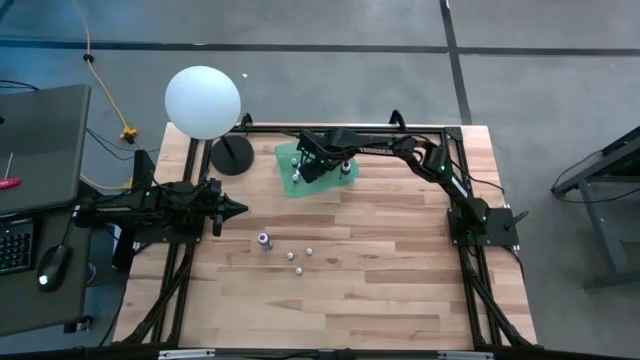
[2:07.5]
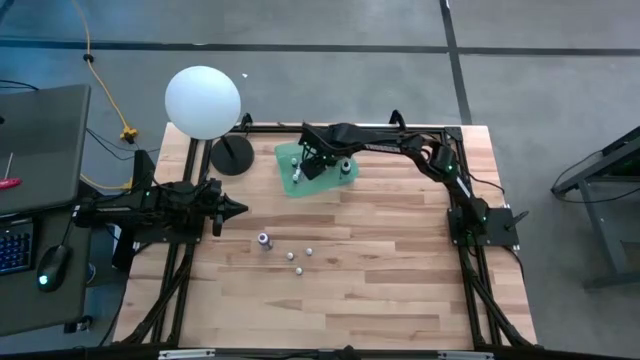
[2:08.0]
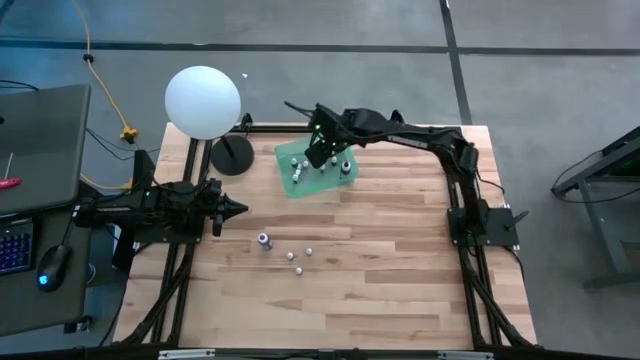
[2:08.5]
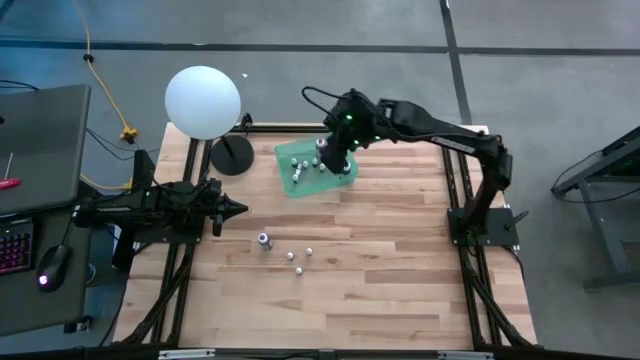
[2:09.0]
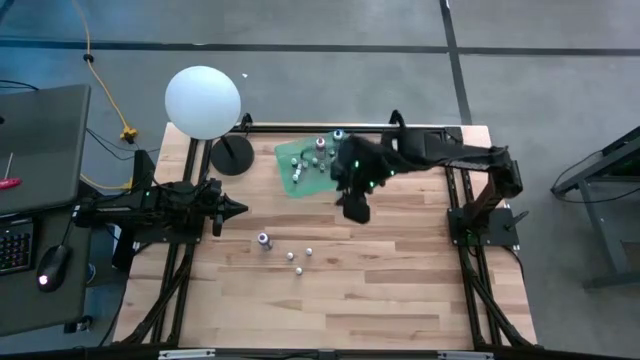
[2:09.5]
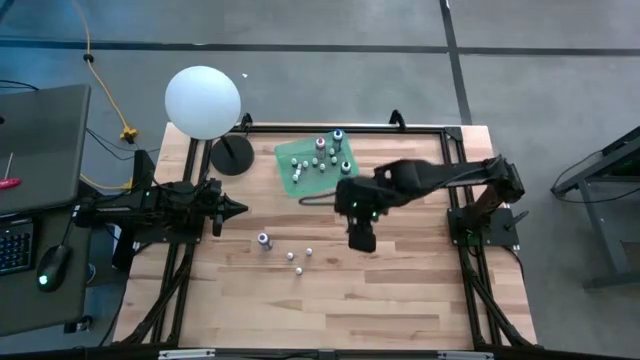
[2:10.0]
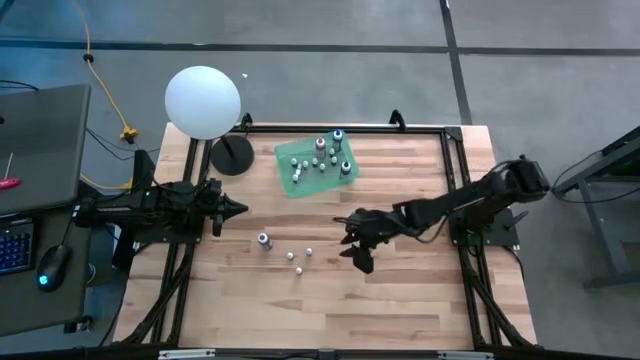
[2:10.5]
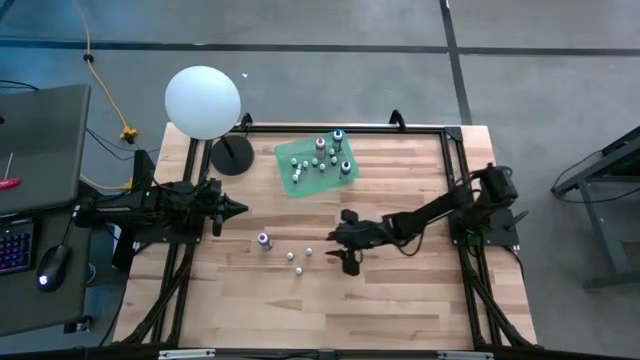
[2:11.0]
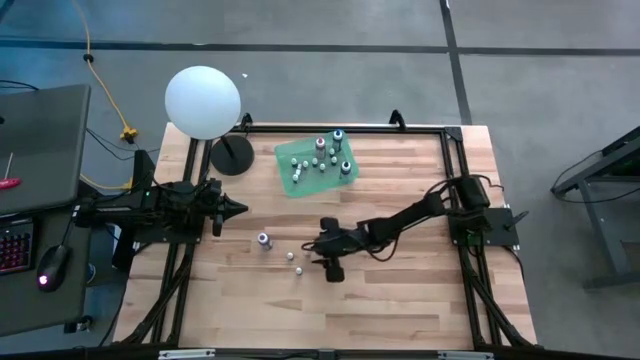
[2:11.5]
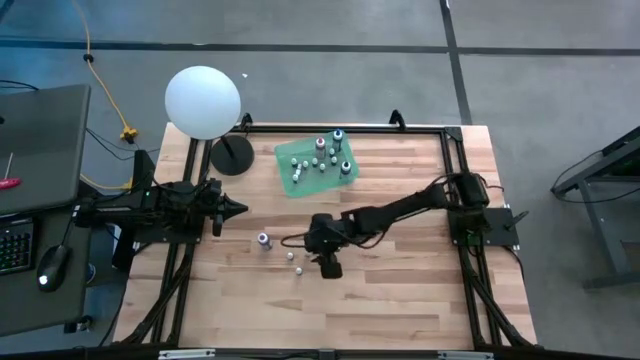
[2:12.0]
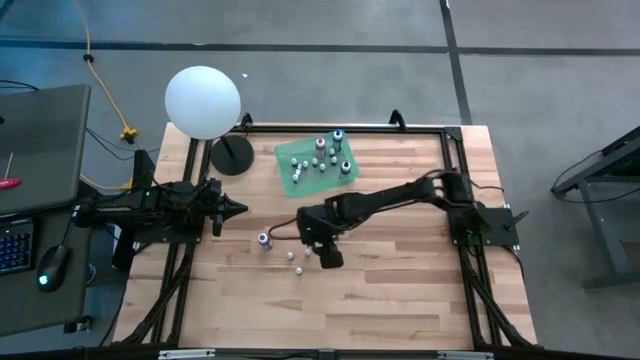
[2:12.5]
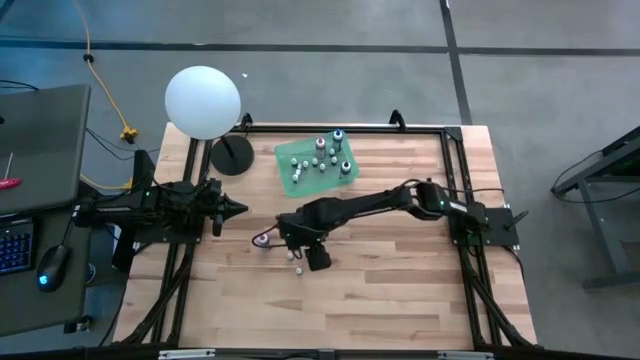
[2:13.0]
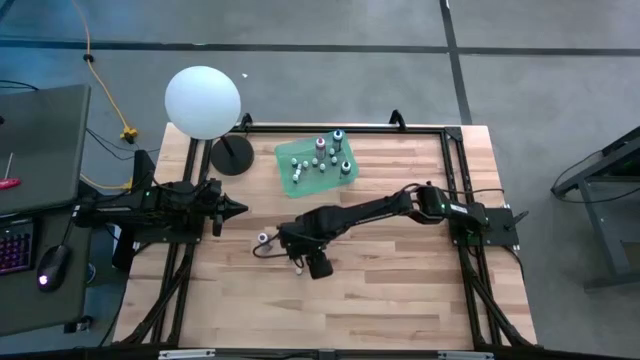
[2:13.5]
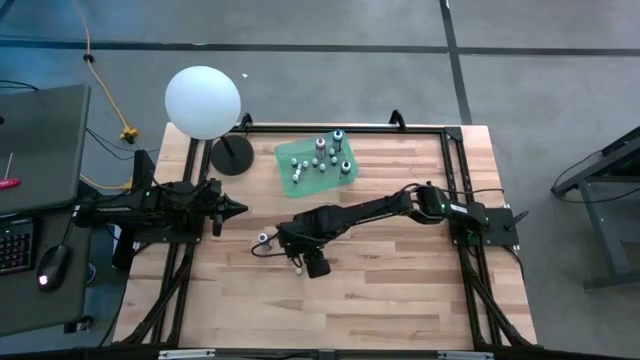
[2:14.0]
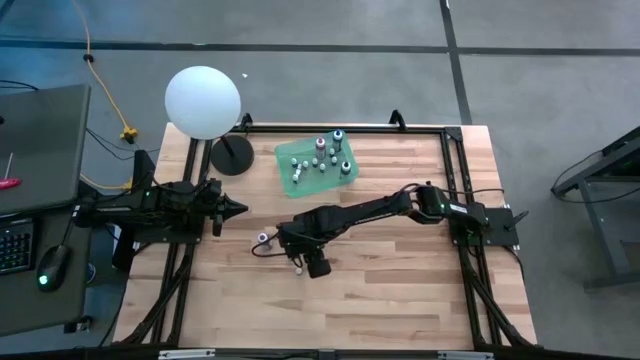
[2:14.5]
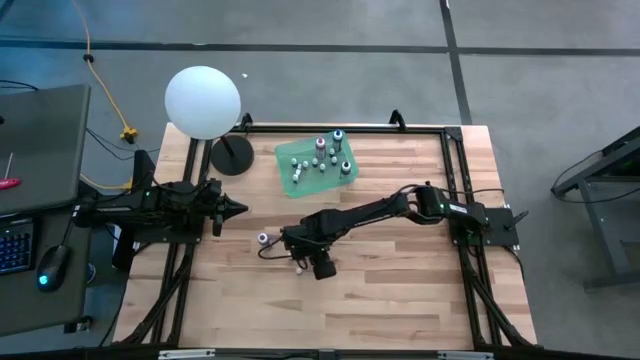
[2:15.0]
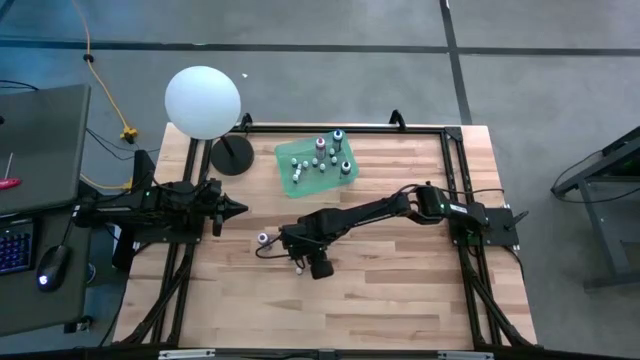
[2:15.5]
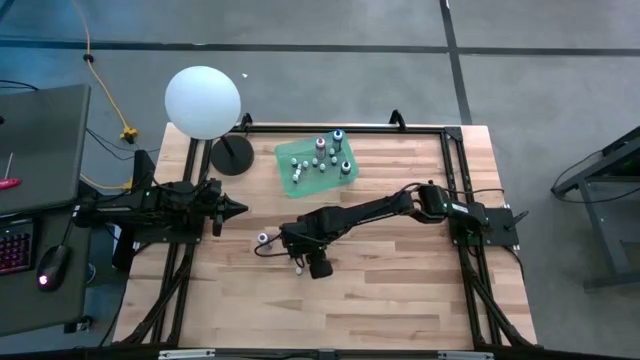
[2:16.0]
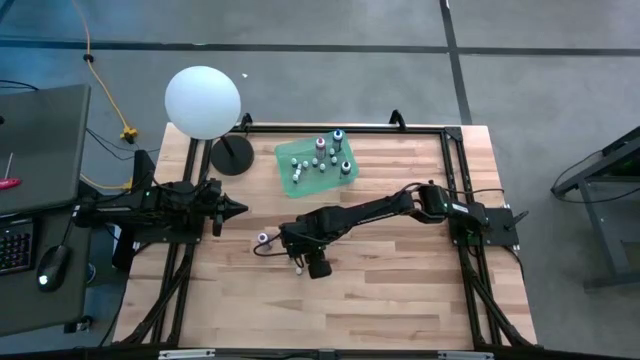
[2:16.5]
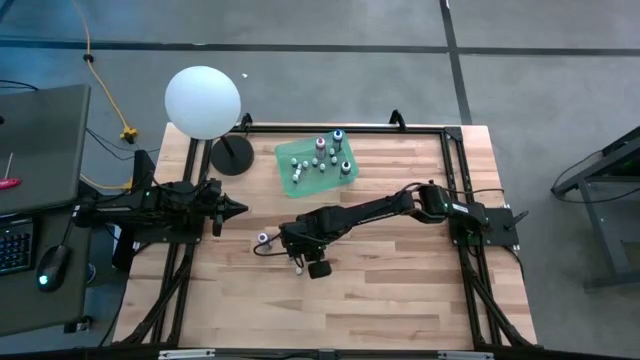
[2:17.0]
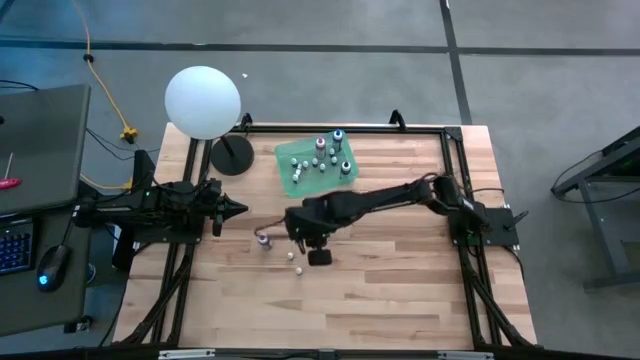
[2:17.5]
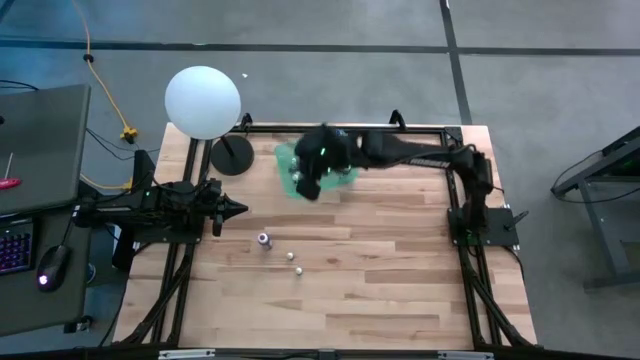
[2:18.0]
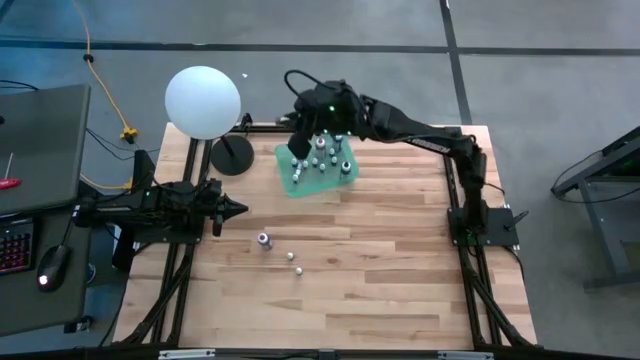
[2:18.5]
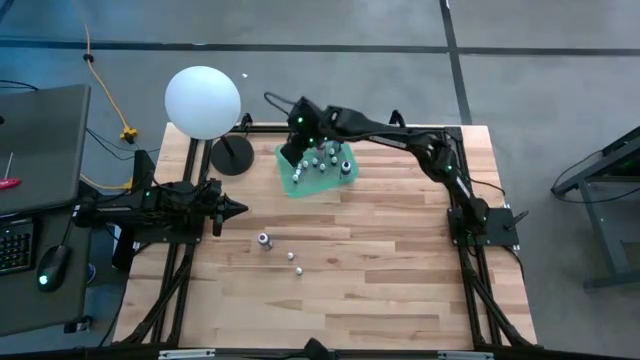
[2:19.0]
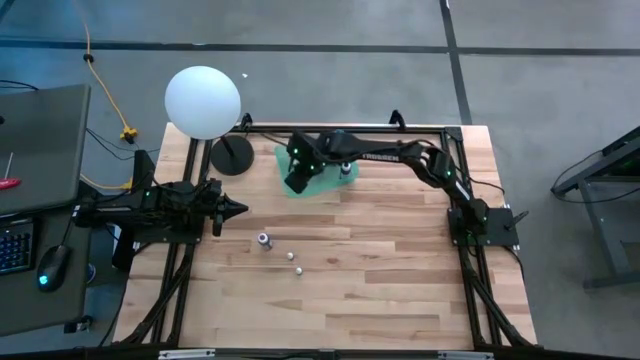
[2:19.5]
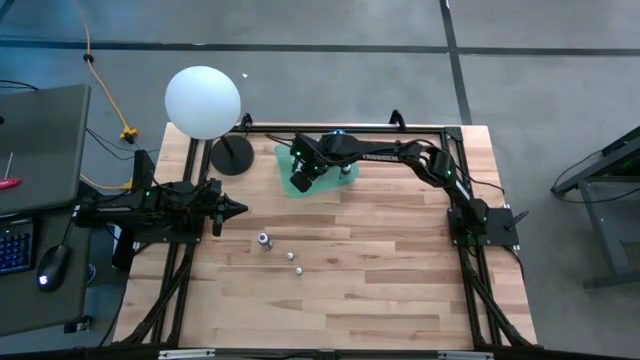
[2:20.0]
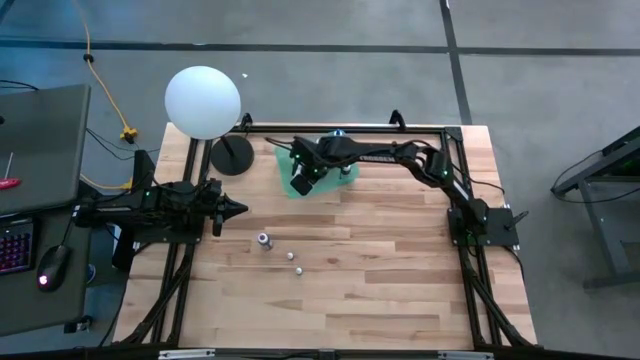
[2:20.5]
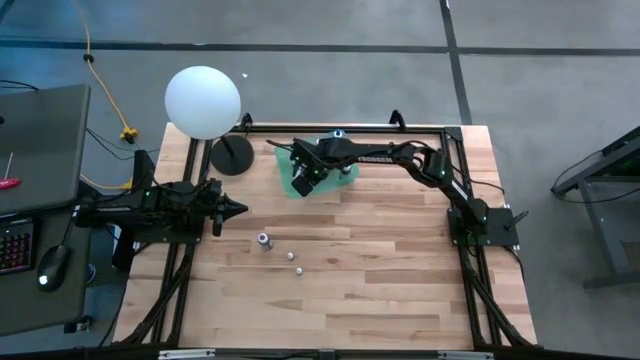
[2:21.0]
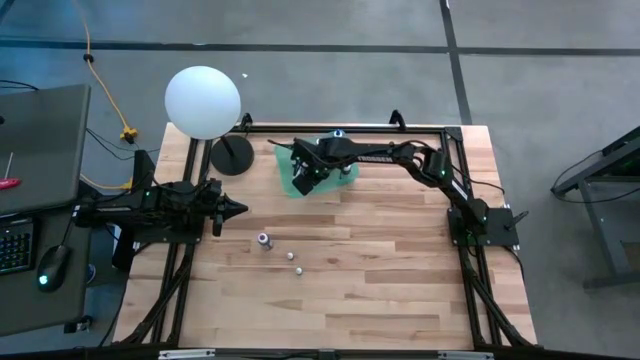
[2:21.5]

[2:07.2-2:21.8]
Task: Pick & Place food coloring
Put the small black dye bottle in the green bin

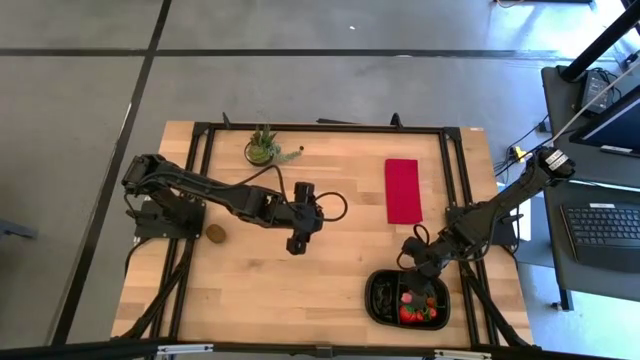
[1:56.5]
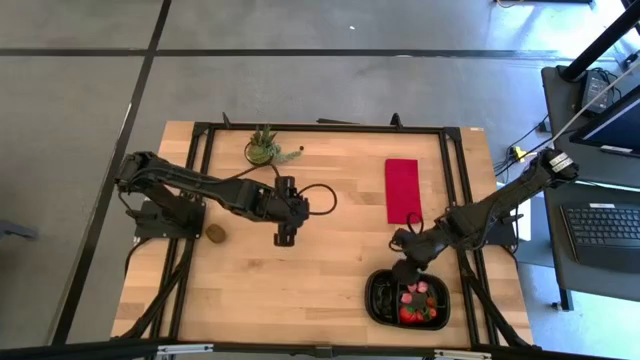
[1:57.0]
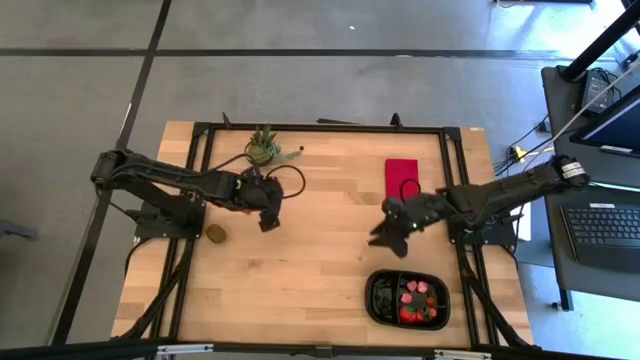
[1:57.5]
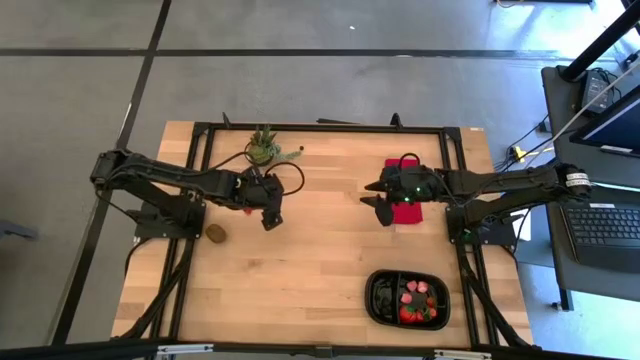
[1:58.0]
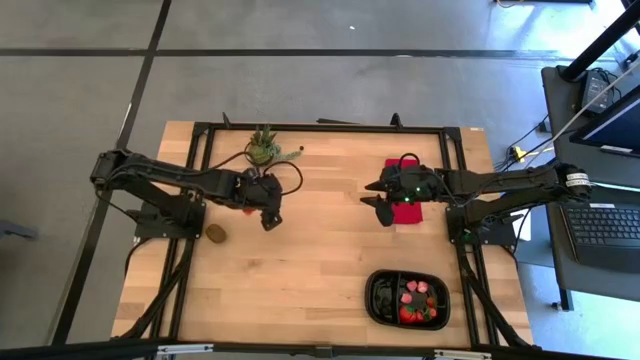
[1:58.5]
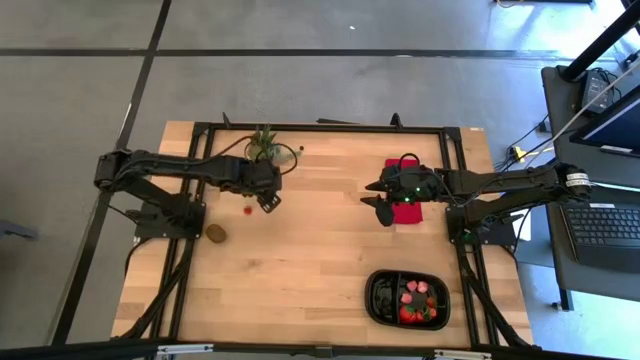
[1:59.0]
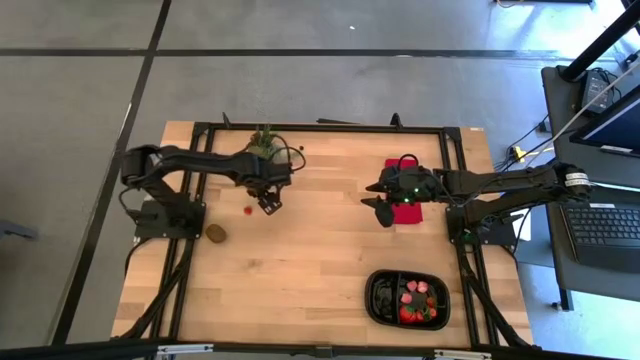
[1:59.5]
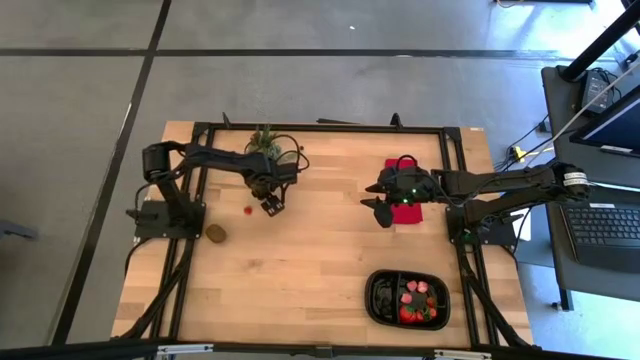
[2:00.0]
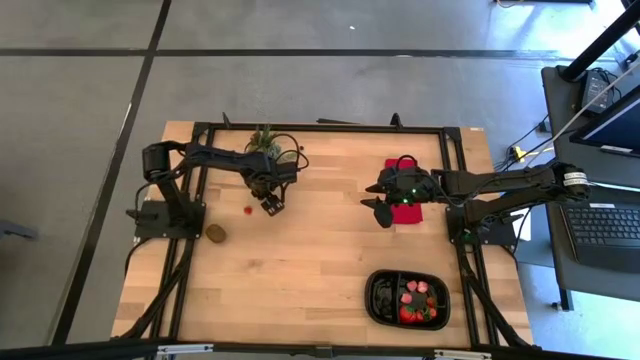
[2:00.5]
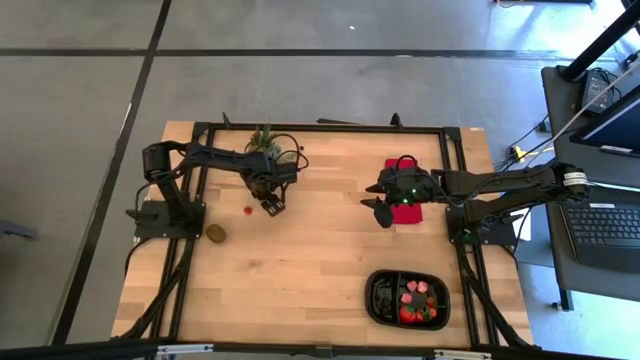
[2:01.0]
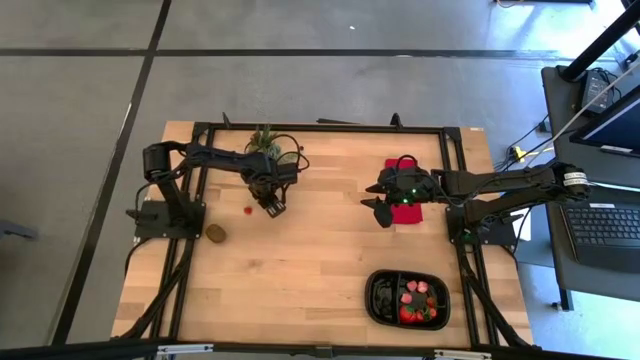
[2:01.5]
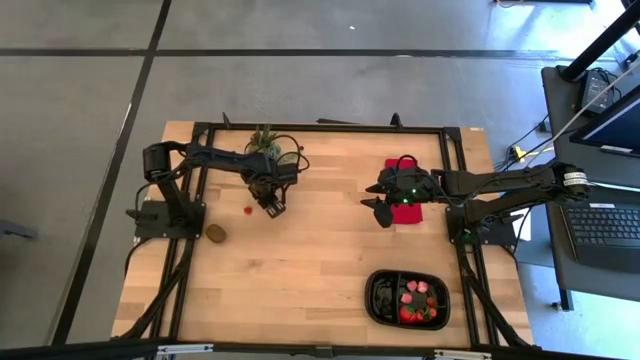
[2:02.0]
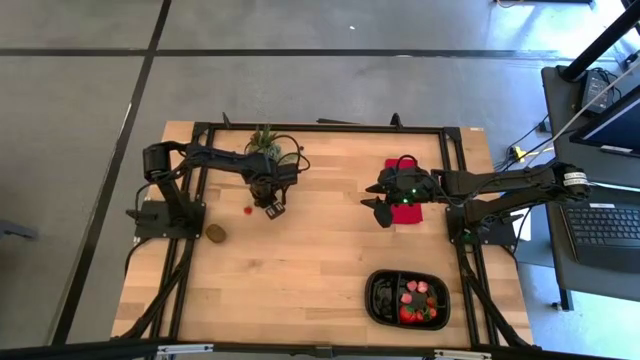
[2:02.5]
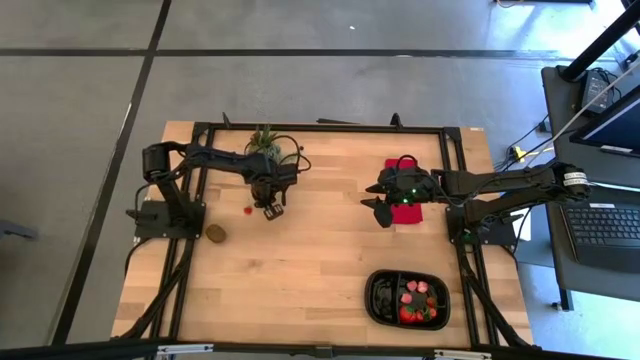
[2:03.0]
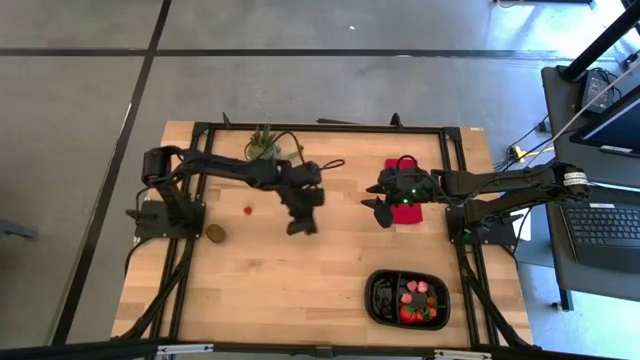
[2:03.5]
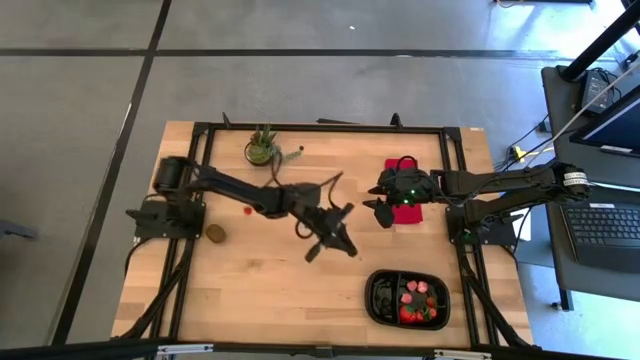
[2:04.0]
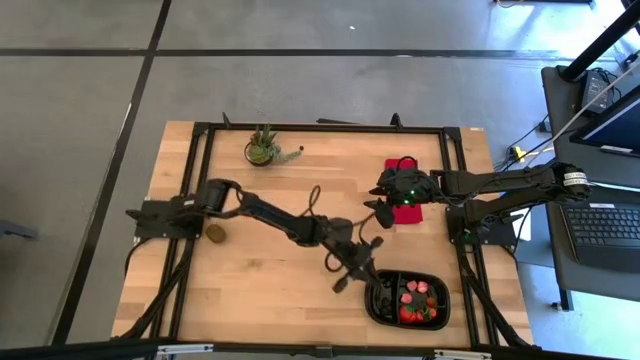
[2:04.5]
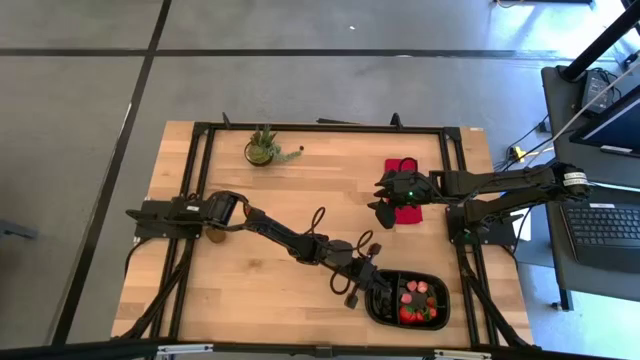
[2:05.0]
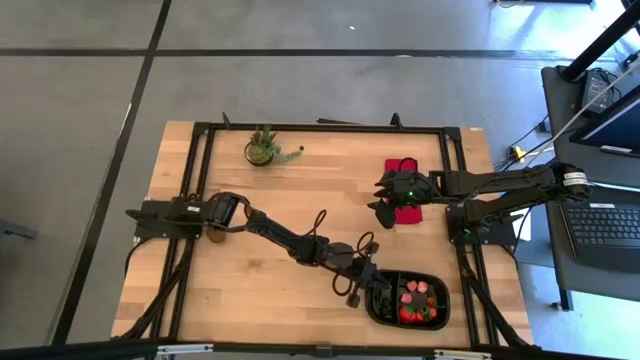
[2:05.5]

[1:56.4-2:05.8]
Task: Pick and placing Produce into tupperware
Put the cherry into the left of the black bin
